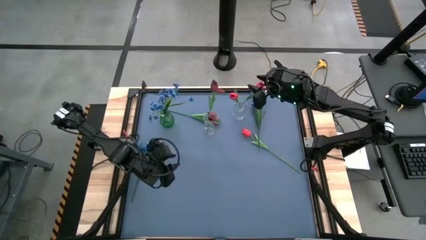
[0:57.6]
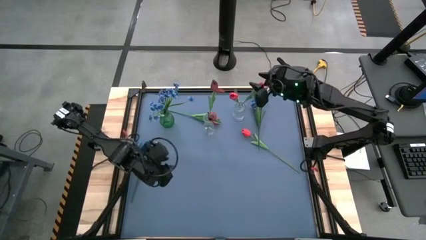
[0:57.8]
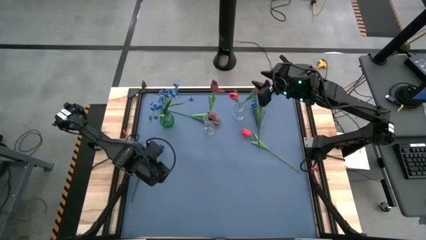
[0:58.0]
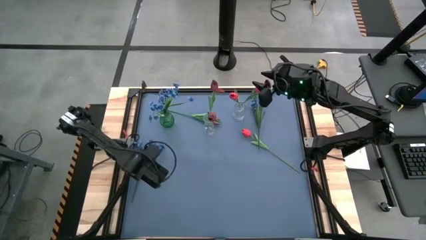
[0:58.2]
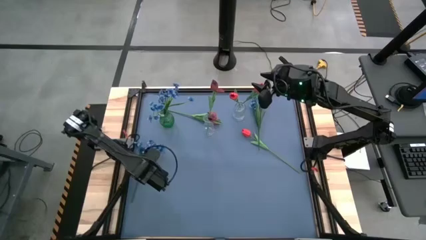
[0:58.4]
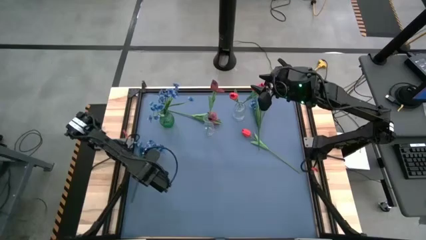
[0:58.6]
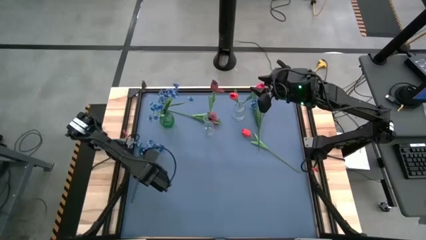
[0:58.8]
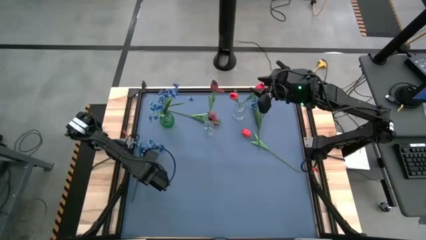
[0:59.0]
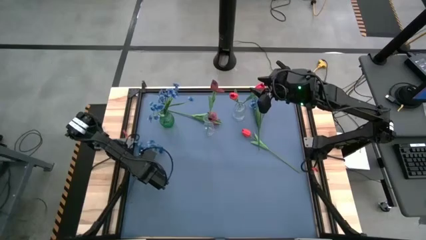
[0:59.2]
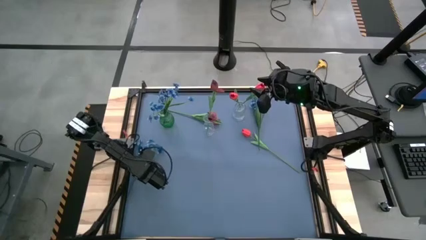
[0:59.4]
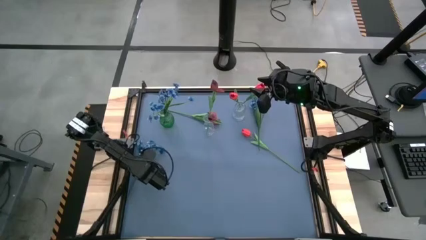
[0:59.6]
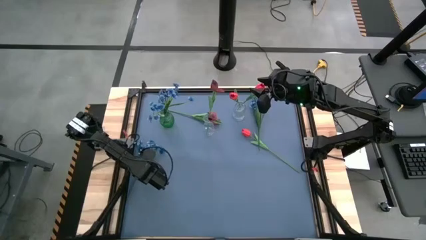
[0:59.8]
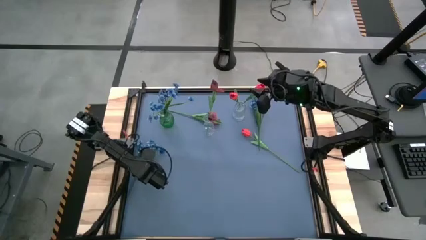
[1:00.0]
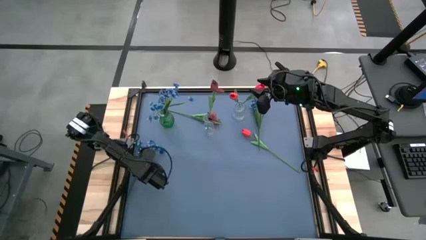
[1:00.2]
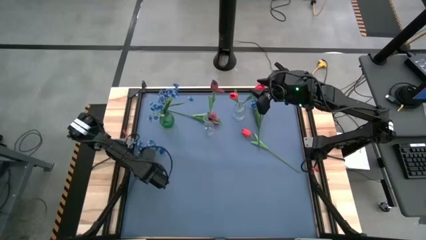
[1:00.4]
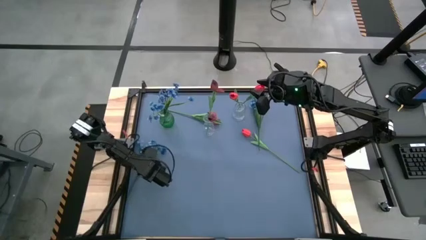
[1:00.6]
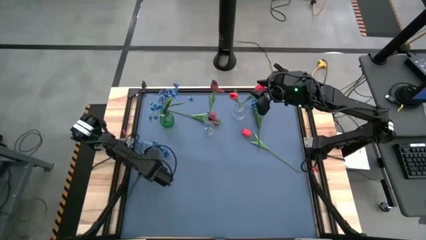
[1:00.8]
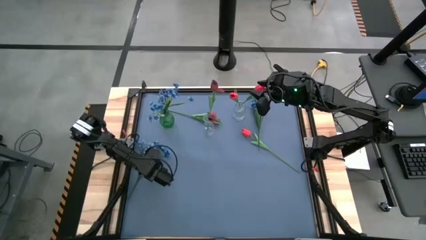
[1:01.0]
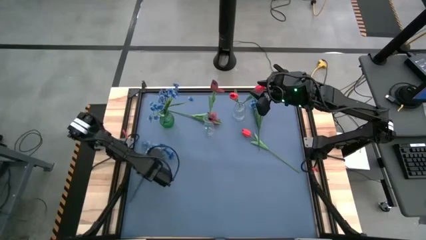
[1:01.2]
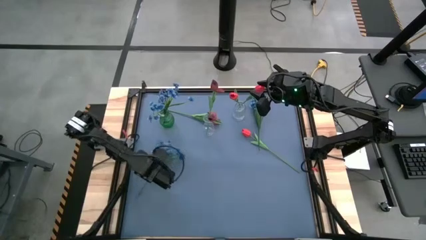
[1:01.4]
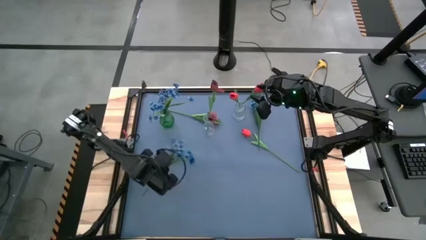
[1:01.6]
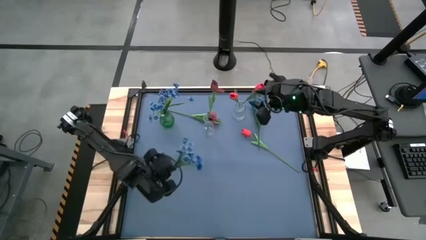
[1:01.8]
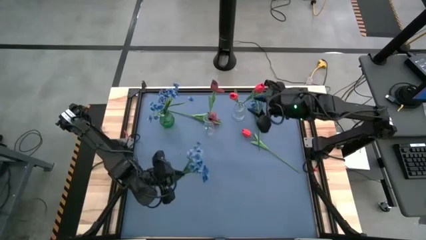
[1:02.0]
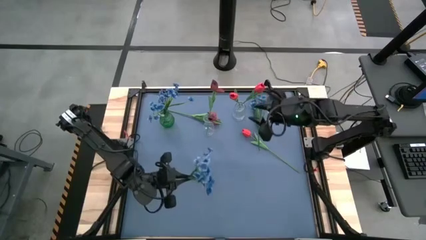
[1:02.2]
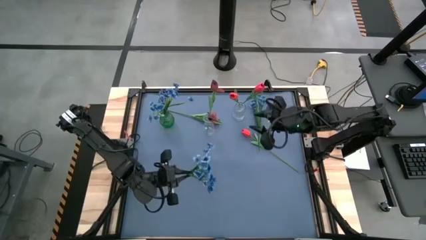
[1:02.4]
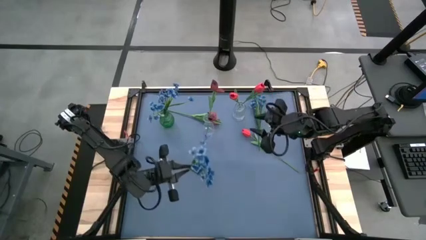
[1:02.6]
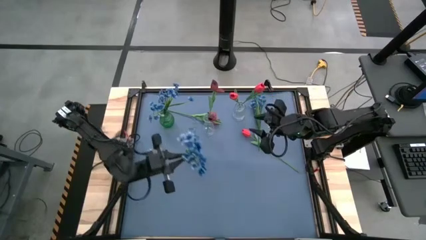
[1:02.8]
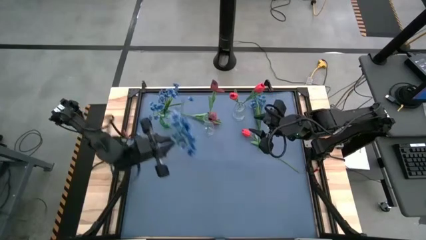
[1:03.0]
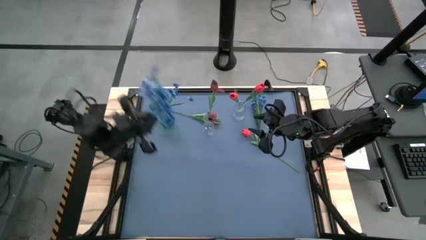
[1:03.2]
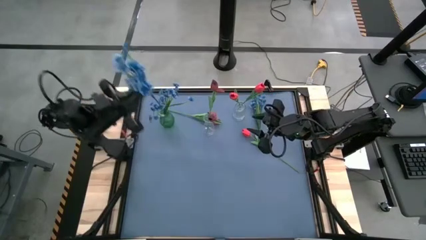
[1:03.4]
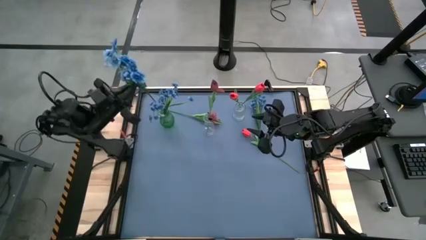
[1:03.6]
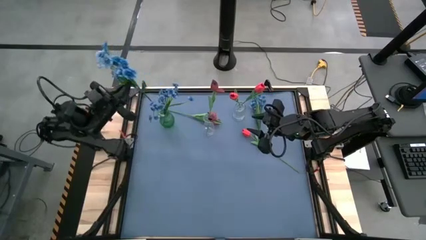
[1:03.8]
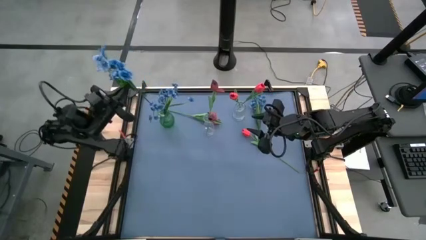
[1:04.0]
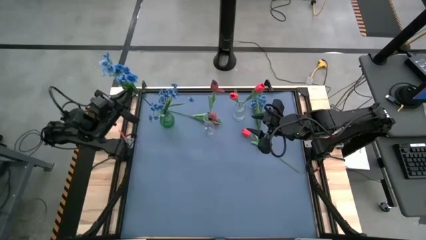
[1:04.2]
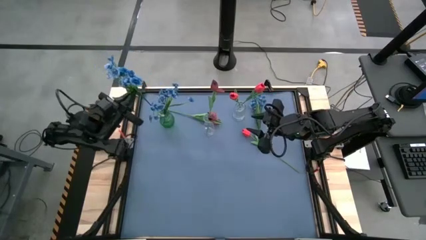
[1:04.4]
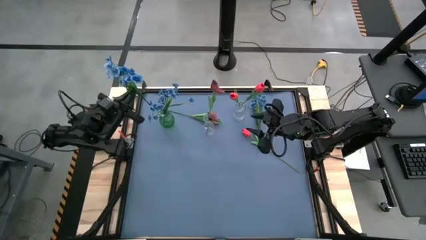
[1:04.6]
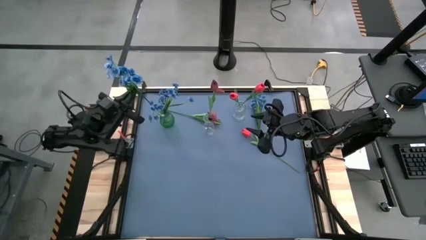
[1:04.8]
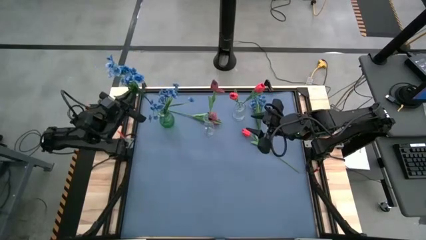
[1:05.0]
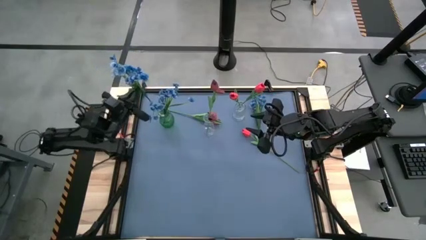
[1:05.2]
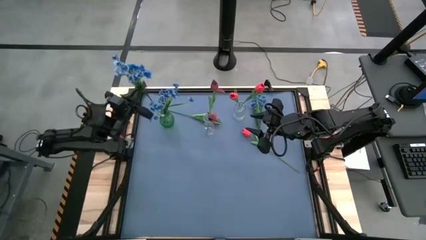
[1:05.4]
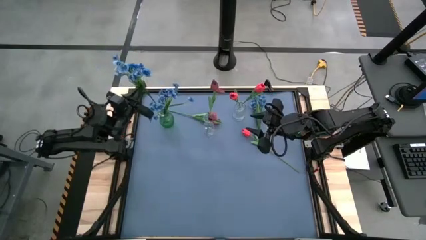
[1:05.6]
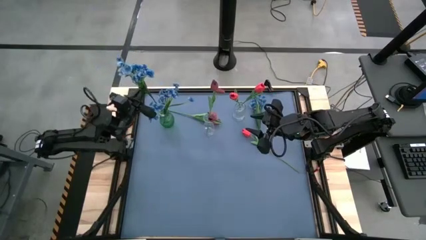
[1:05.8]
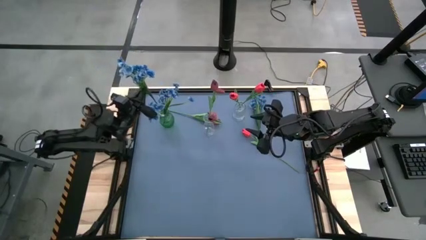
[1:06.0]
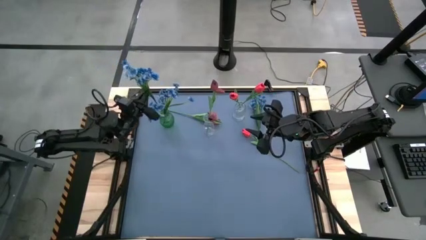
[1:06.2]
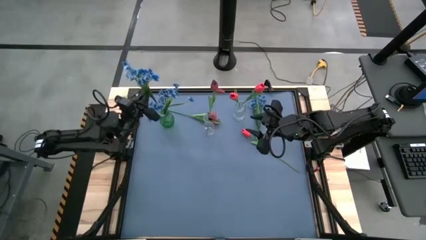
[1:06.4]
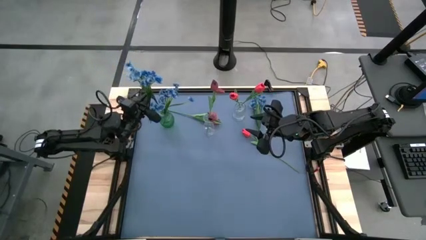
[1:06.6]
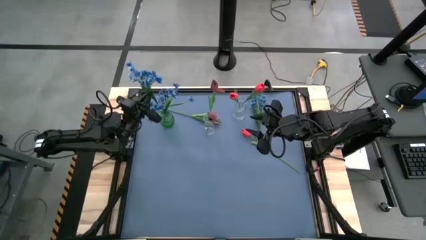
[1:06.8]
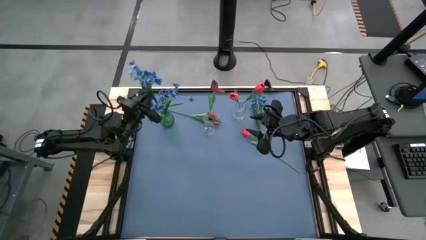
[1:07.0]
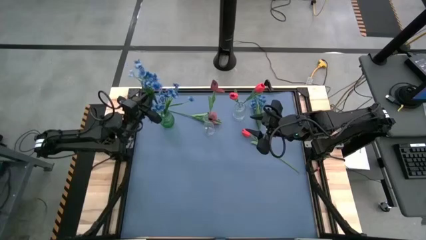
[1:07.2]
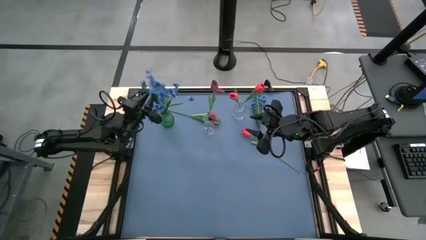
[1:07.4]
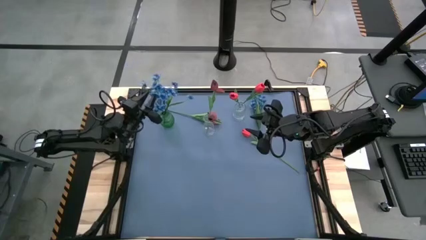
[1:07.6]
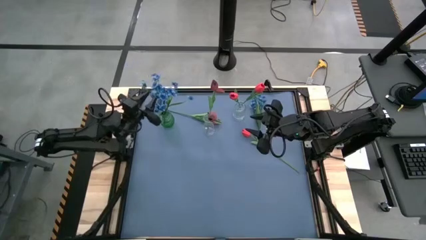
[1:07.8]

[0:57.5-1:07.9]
Task: Sort flowers into vase by color
Put the bottom blue flowers into the green vase

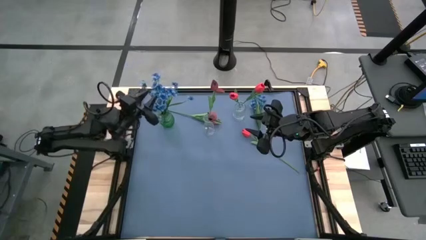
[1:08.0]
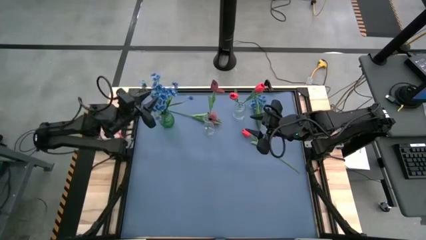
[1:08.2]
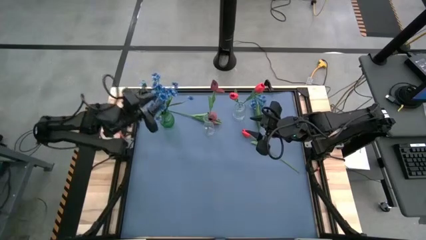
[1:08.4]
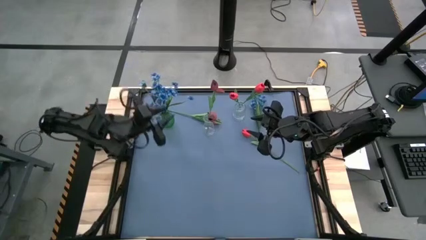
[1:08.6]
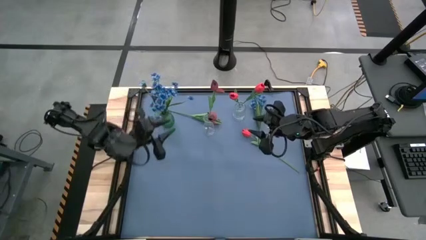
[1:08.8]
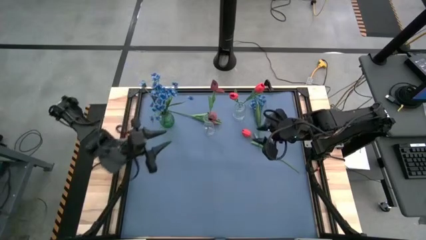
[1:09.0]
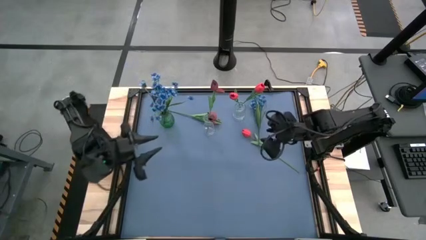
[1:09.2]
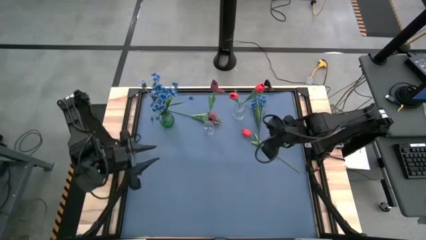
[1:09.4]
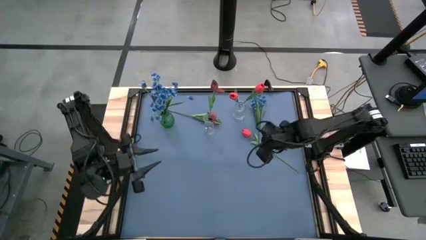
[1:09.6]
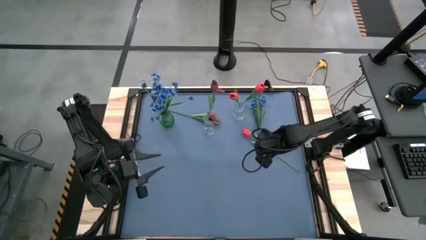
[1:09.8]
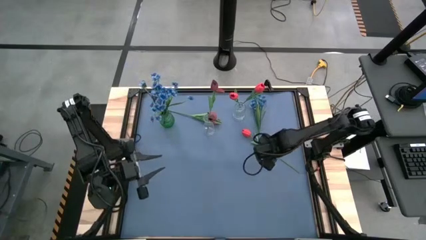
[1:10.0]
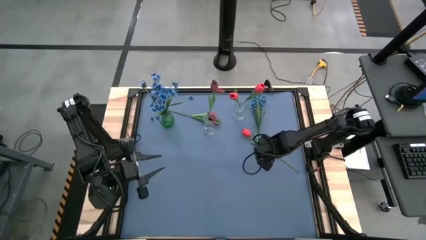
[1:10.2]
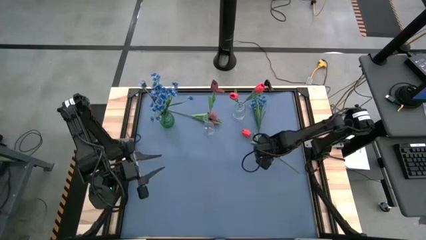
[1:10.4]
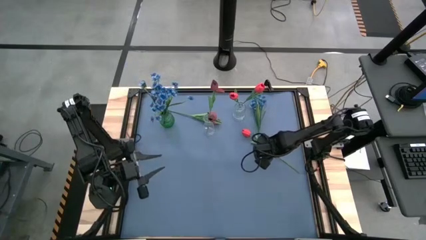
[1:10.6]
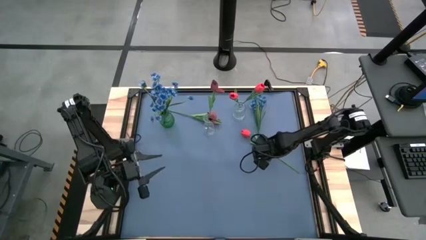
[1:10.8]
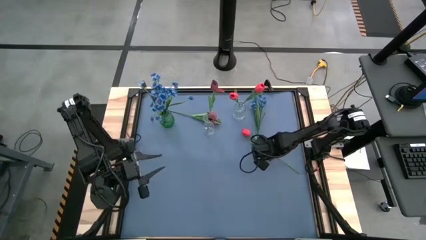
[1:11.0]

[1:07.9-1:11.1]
Put the red tulip into the top transparent vase
